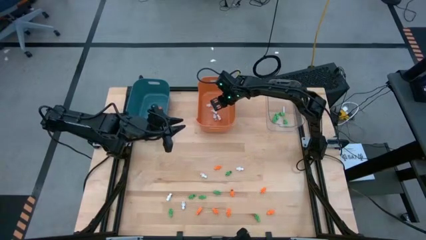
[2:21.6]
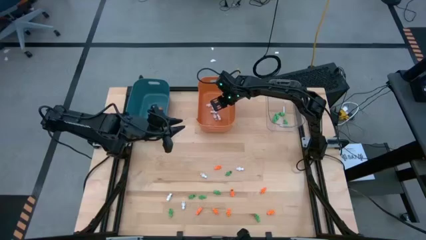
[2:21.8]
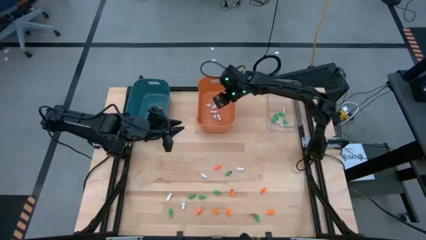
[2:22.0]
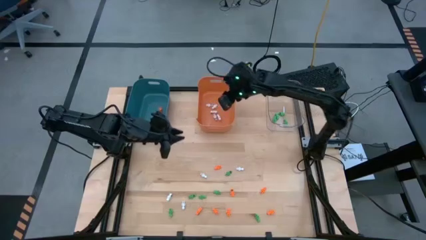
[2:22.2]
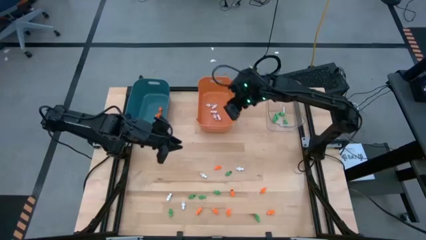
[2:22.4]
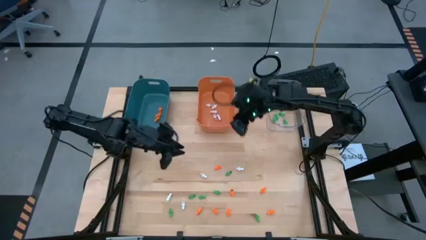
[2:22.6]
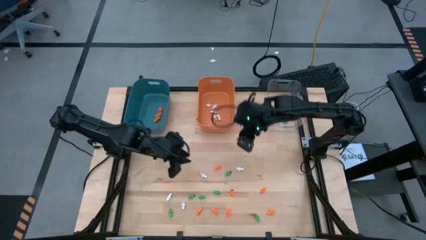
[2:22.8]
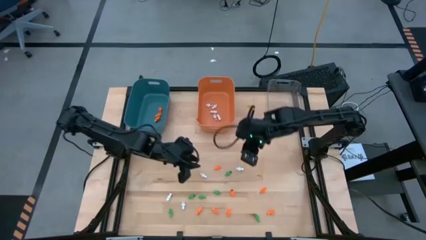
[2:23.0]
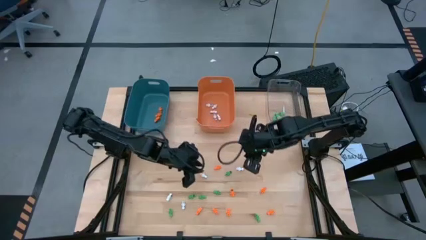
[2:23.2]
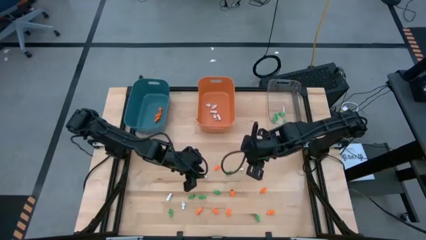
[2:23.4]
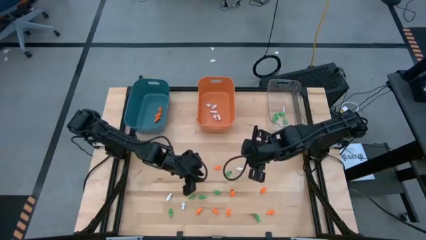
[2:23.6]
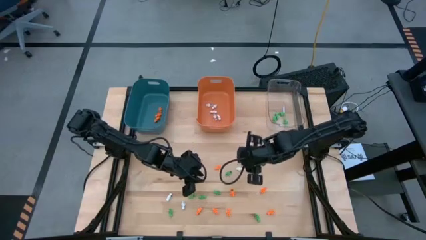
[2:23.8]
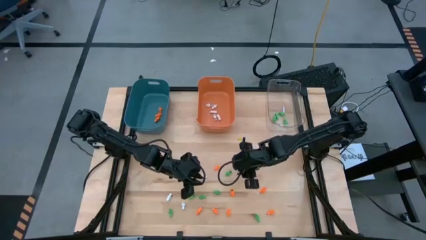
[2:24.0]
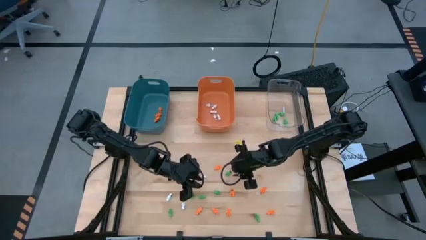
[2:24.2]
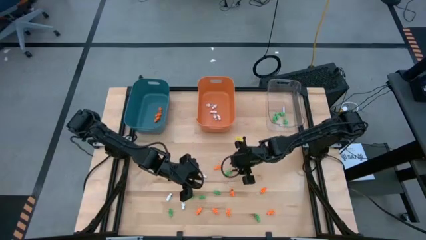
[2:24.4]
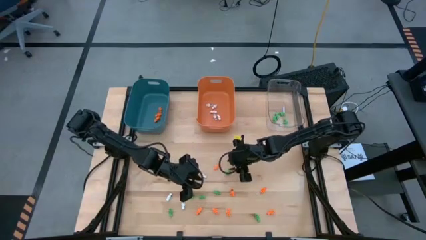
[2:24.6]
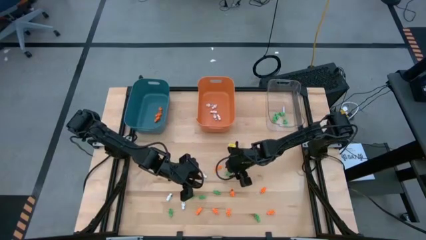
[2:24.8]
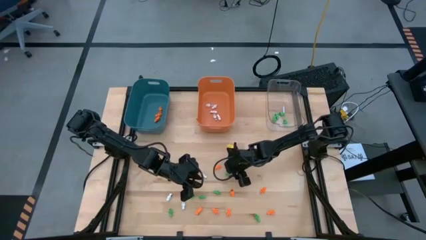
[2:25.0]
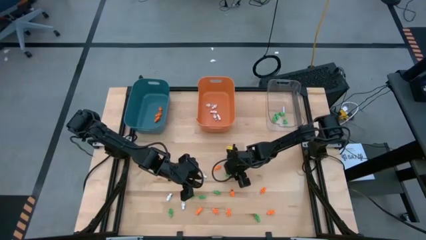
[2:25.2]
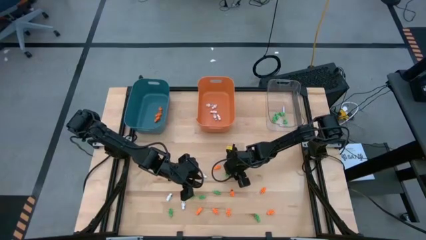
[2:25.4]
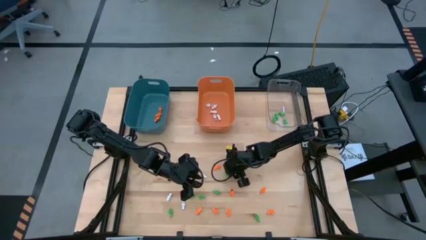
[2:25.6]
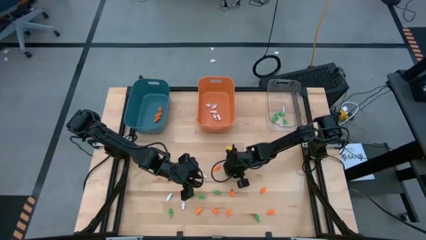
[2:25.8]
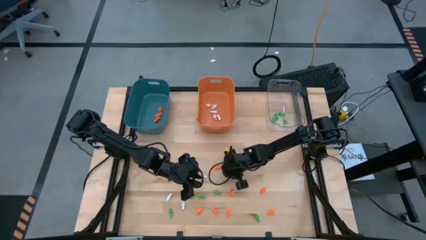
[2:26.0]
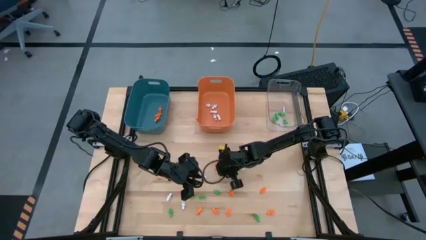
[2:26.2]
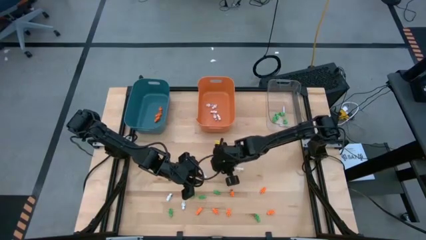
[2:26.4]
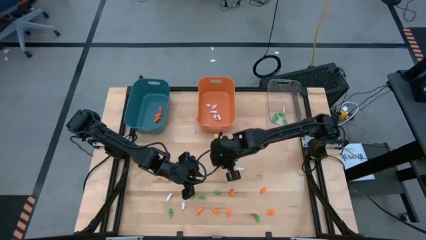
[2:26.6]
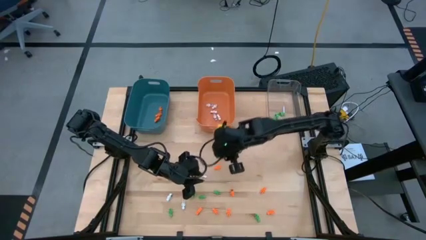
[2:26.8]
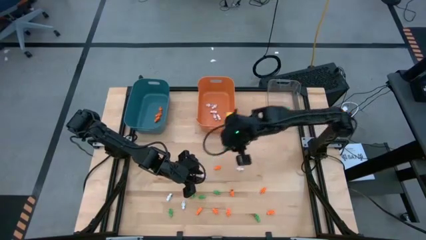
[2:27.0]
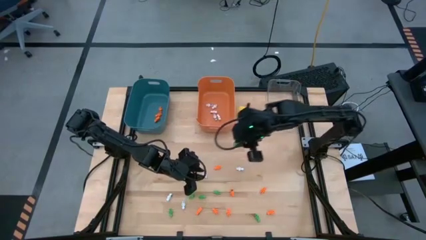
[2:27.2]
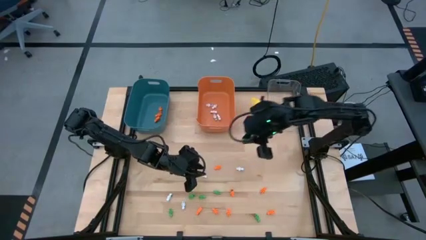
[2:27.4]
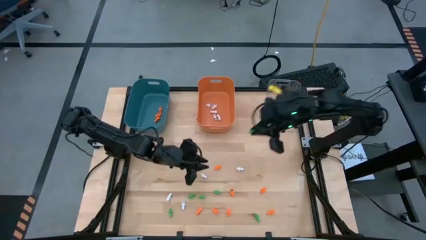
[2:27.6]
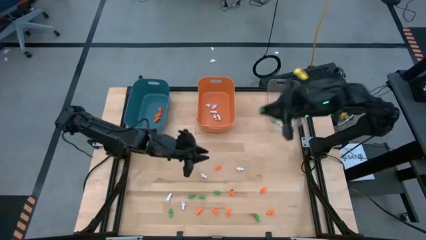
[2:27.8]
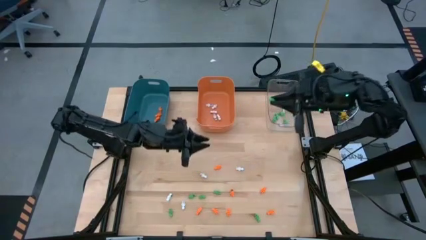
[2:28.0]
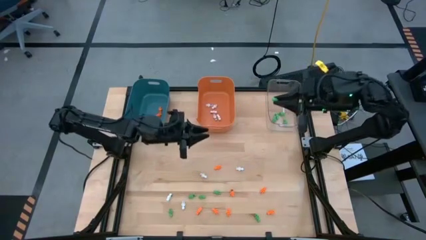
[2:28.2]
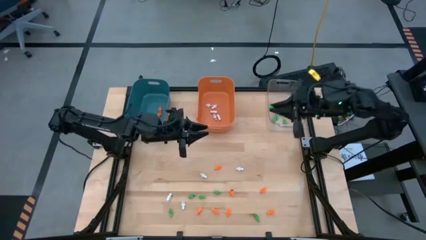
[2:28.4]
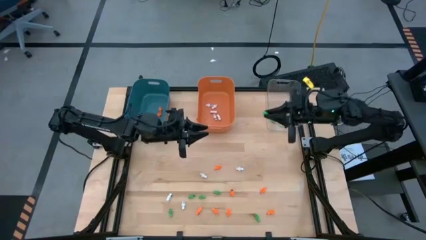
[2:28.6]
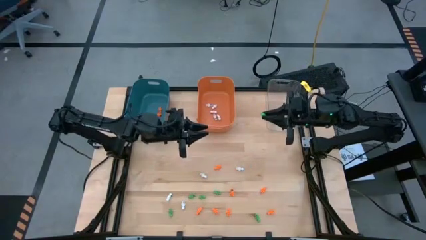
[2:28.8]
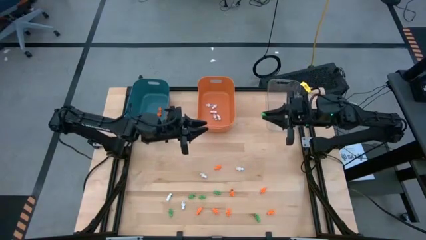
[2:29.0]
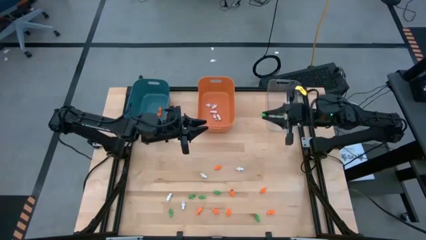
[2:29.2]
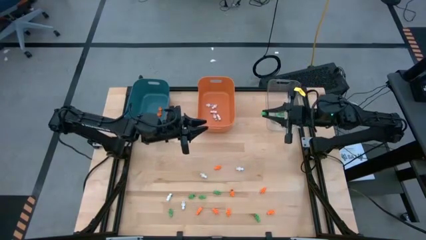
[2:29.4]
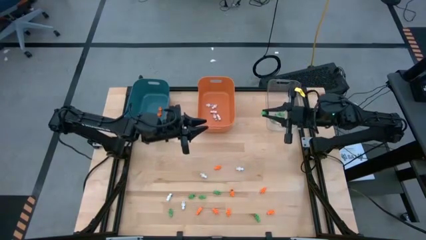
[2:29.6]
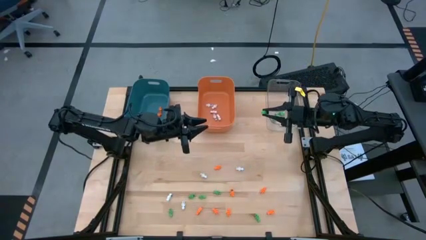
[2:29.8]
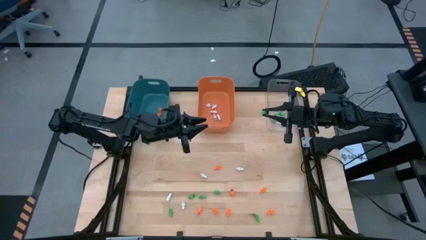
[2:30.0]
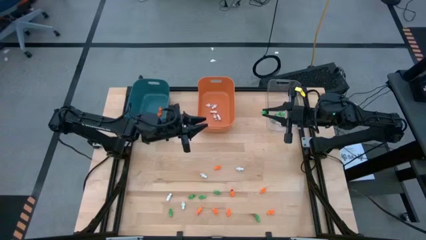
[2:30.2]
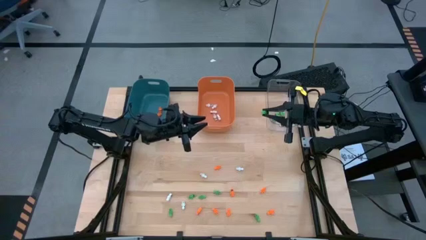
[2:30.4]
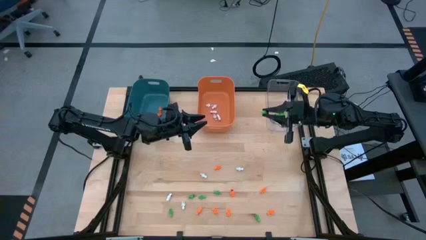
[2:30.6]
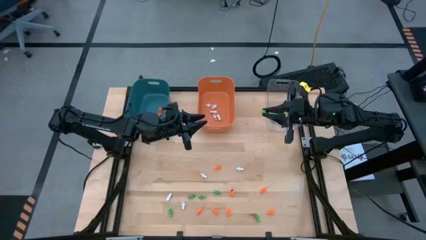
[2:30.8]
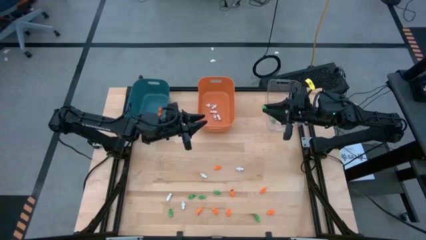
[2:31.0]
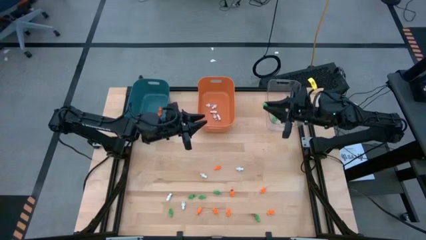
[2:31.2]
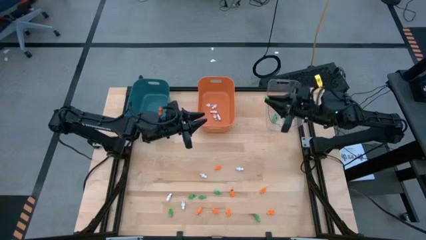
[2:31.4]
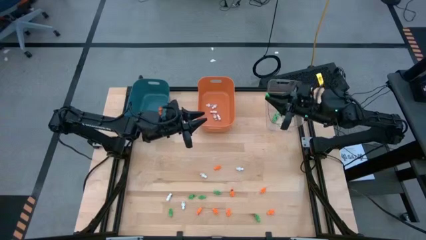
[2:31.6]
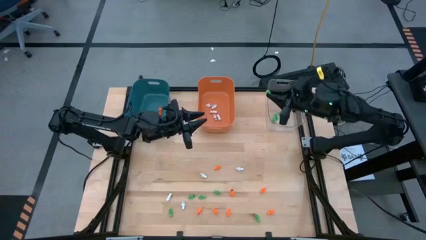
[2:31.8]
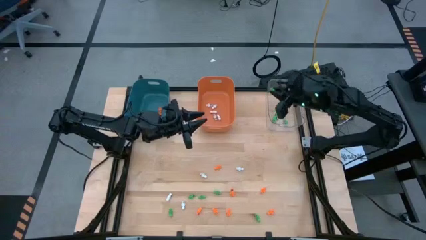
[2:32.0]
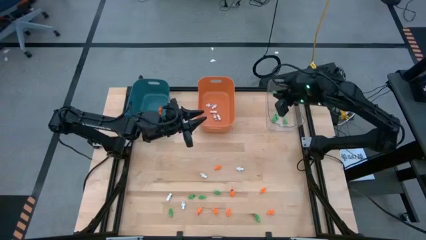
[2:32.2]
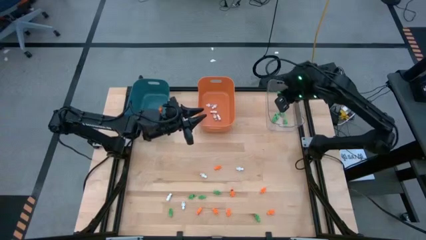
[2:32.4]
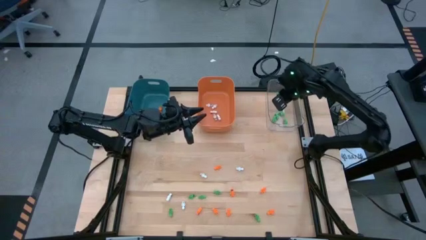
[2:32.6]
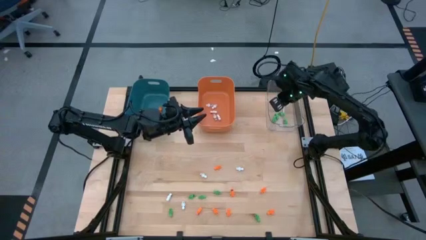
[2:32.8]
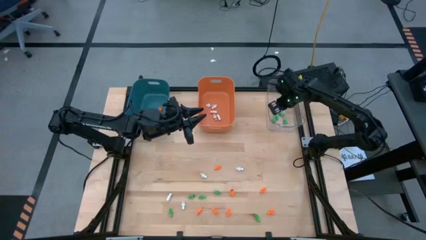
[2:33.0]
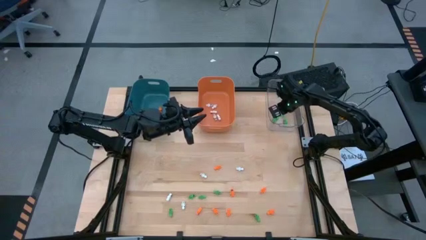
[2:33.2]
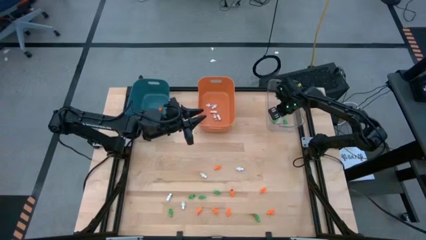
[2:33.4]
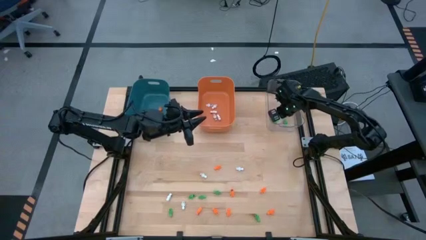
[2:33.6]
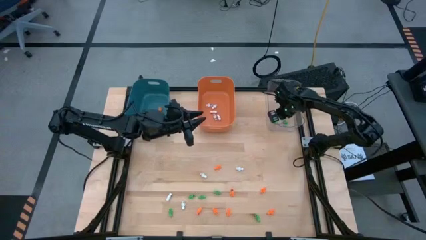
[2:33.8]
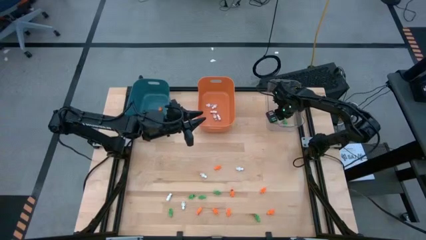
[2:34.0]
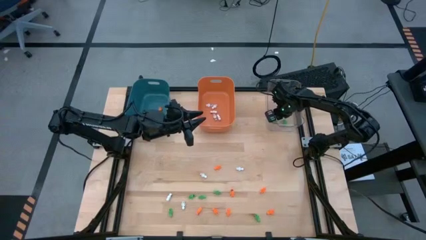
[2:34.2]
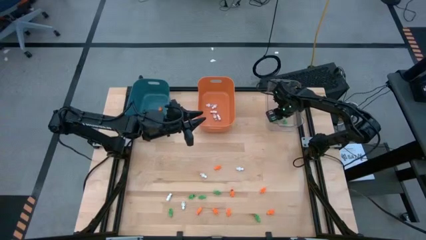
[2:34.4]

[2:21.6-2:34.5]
Task: Sort Halloween decoration
Put the green skeleton toy into the transparent bin
